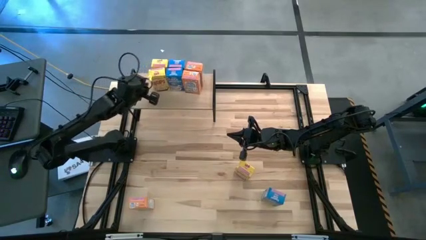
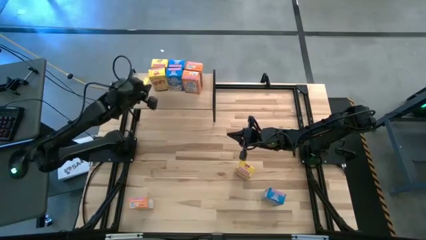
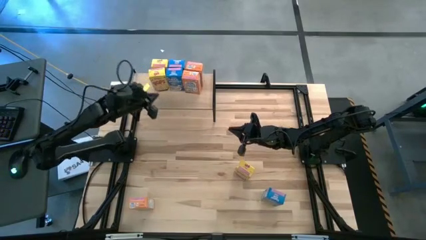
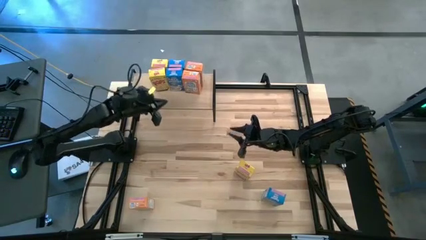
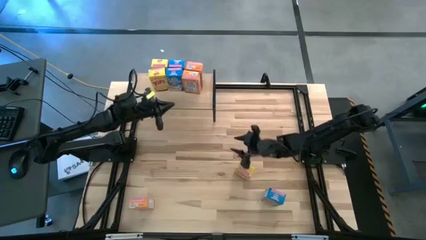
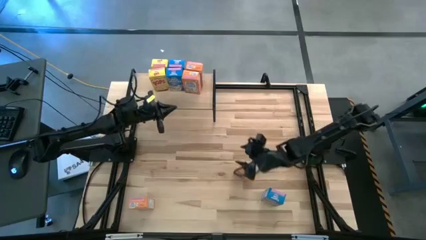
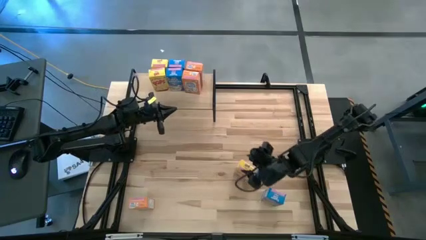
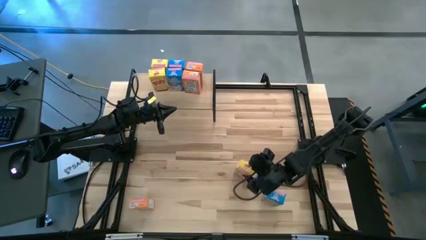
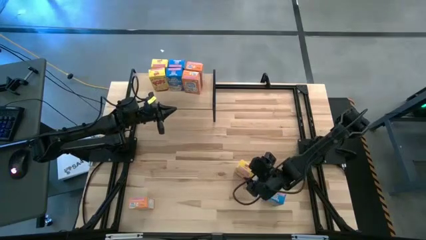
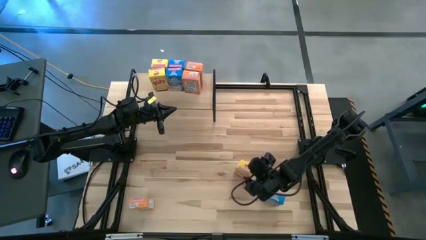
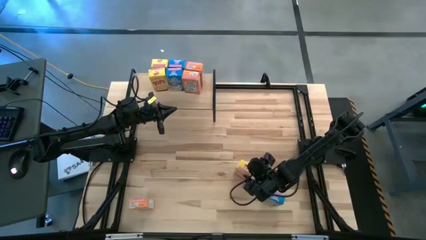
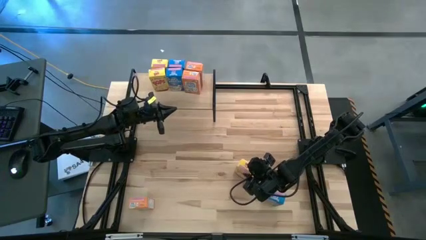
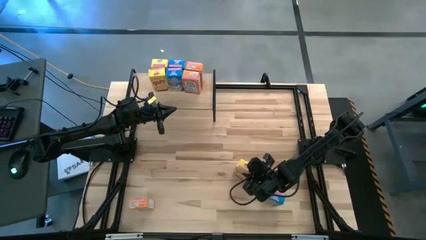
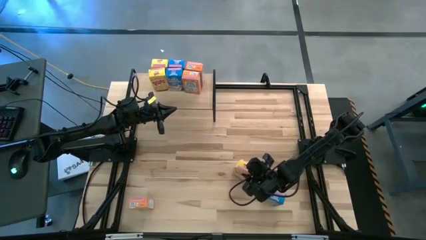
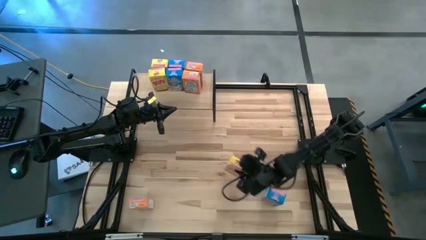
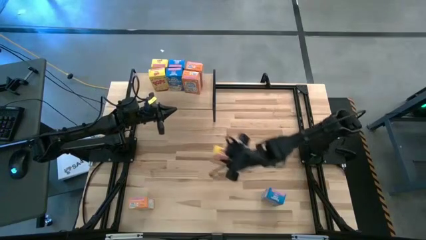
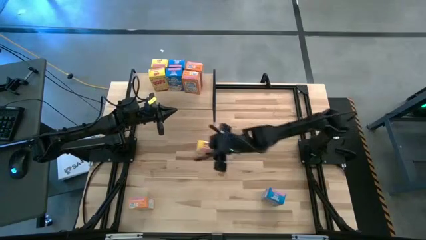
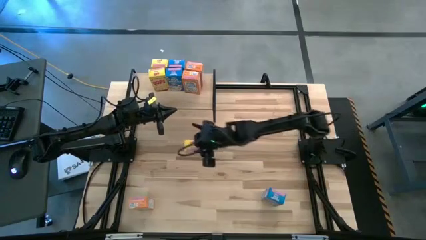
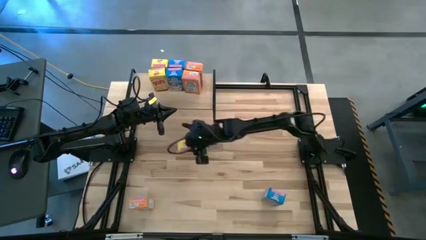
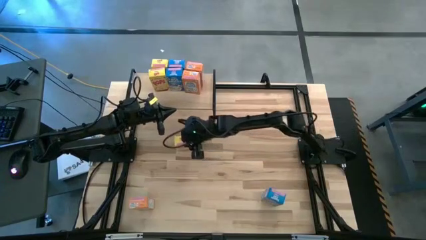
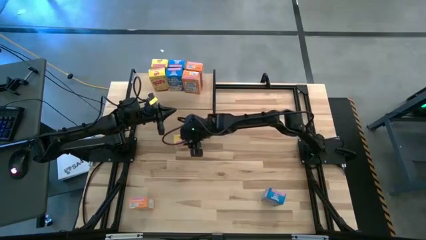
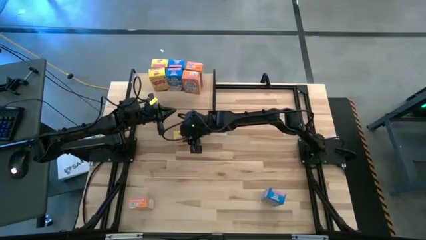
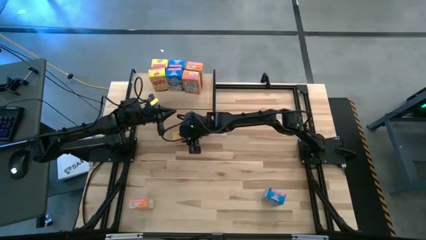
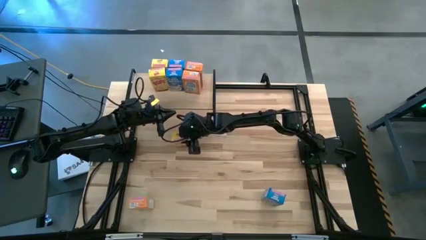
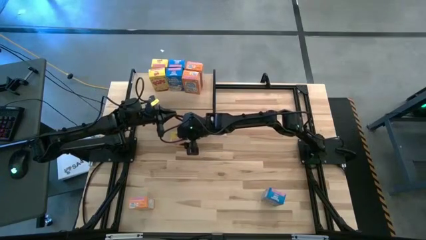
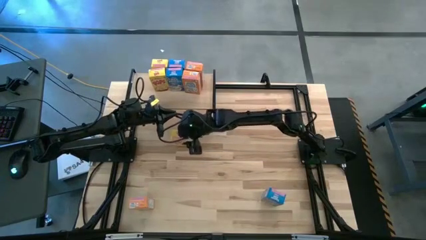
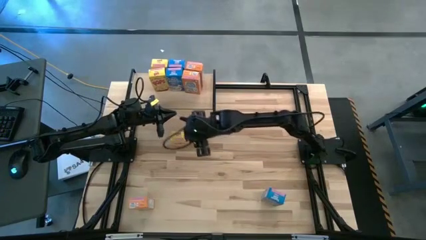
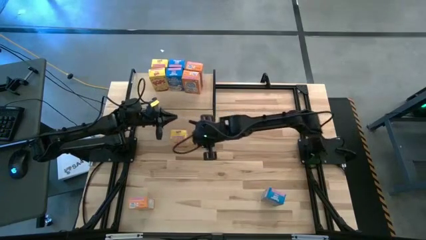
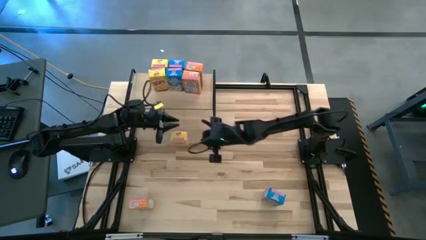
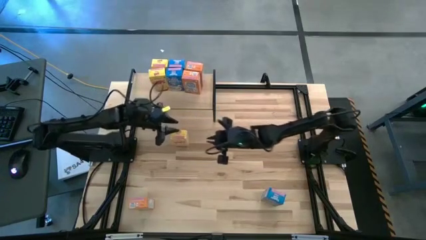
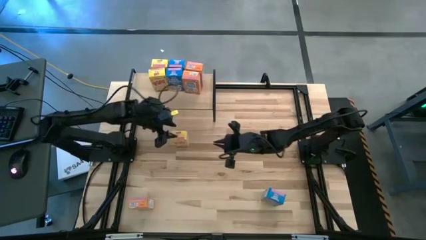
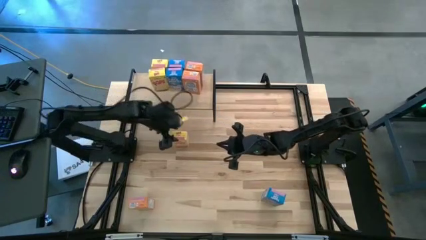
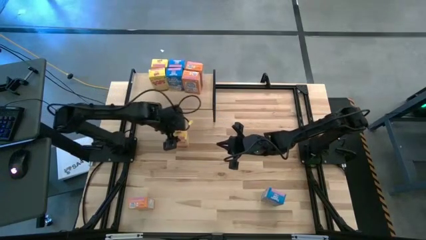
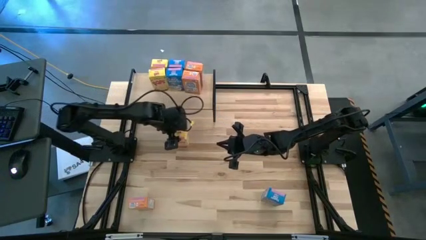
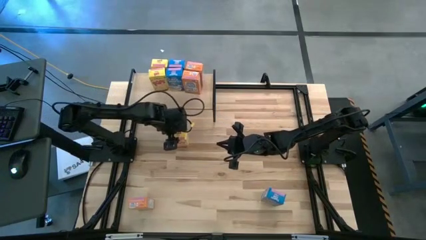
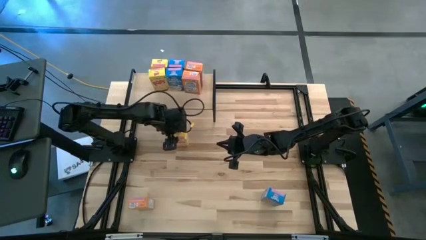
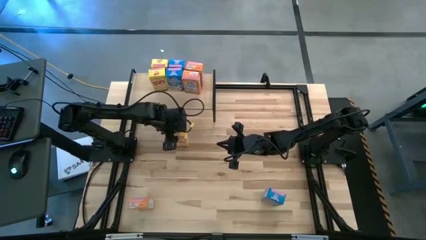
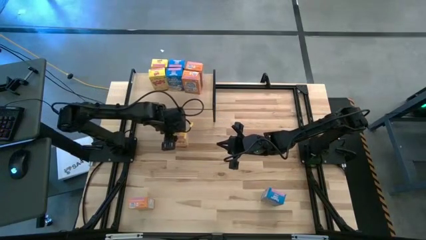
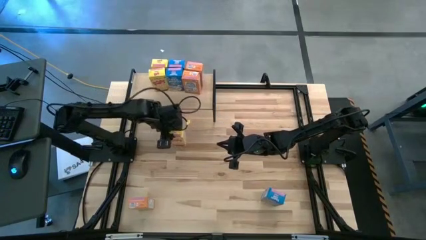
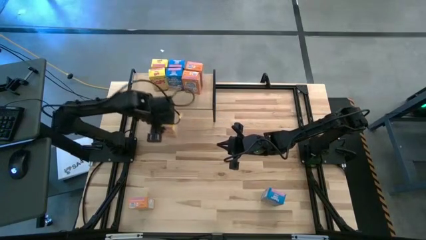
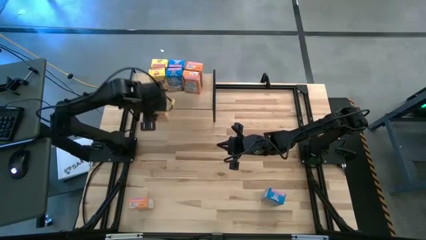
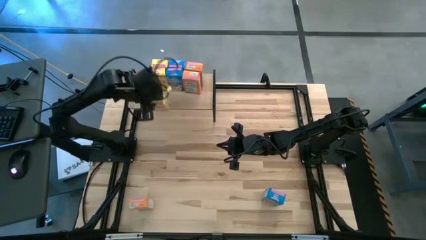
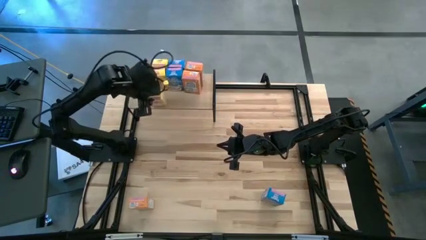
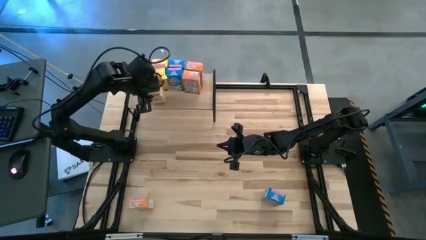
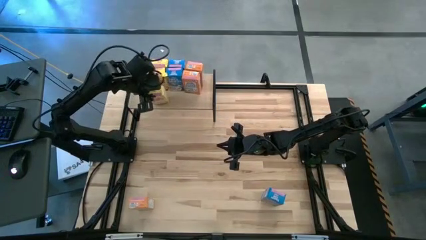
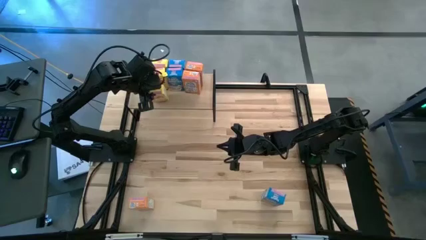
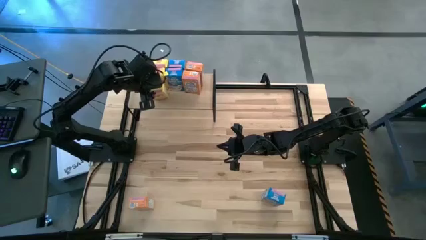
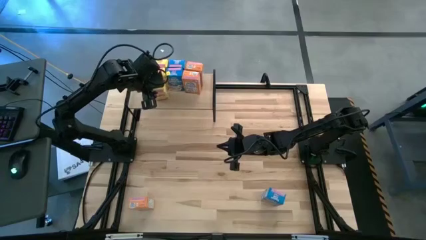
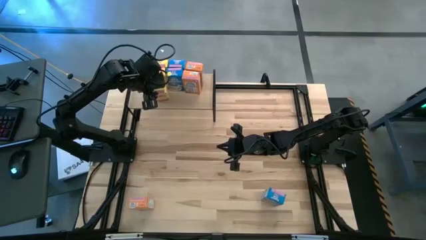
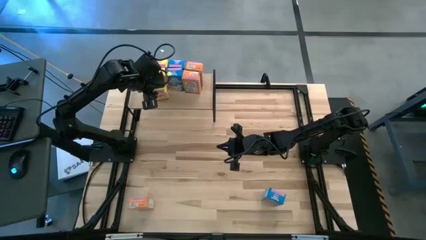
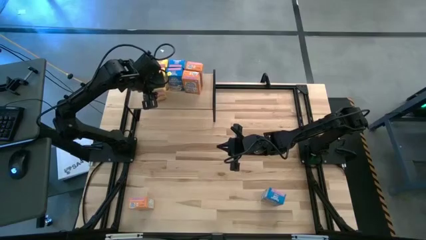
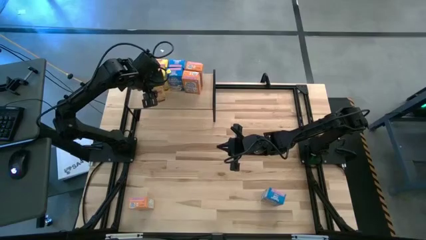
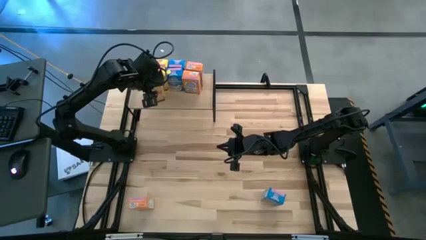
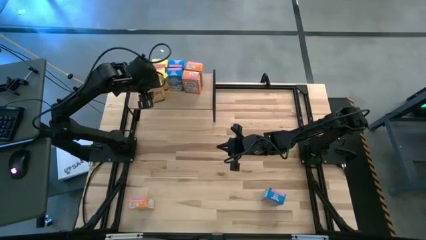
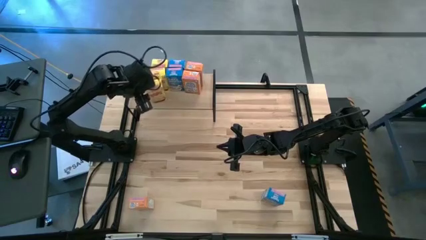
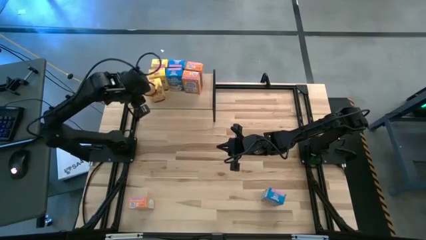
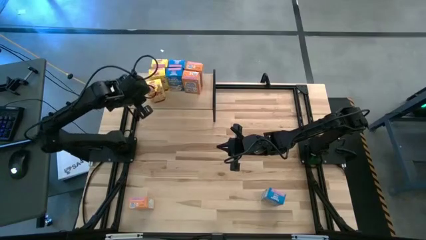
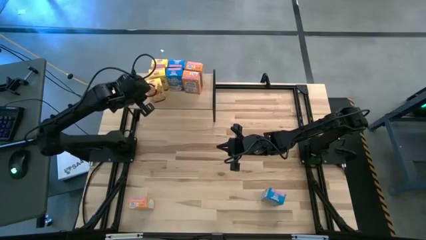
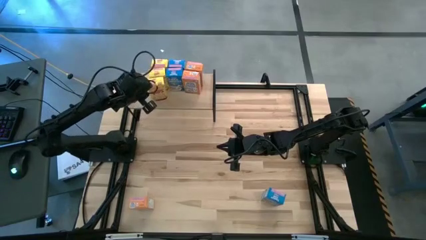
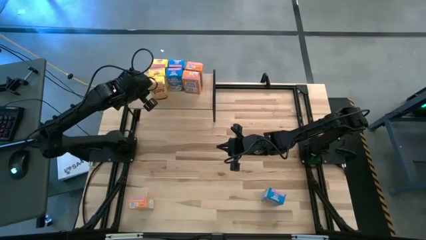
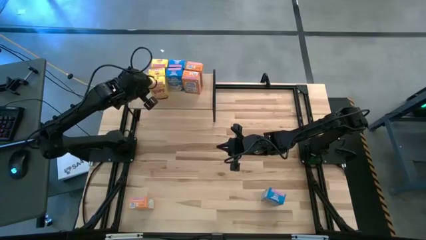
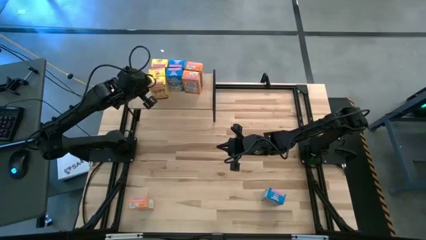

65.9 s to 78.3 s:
Task: Stack cereal on shelf
Put the yellow cereal box on the shelf aligned with other yellow cereal boxes

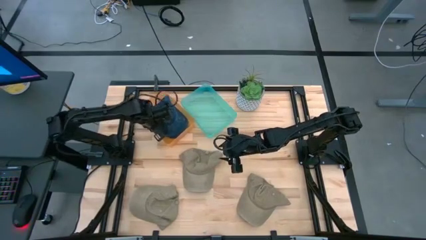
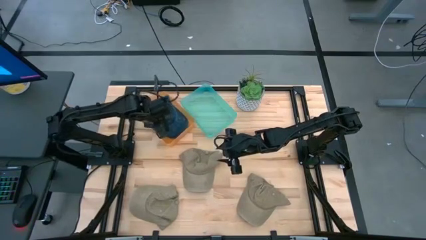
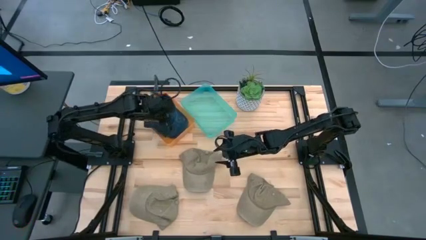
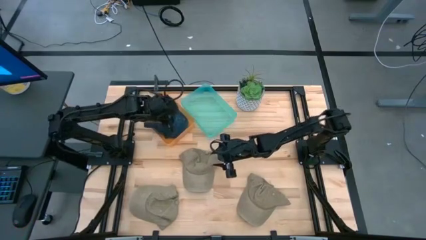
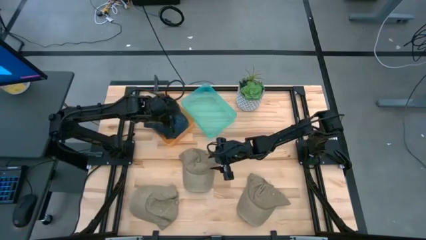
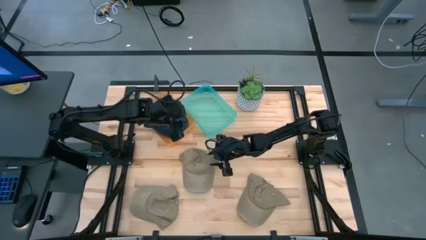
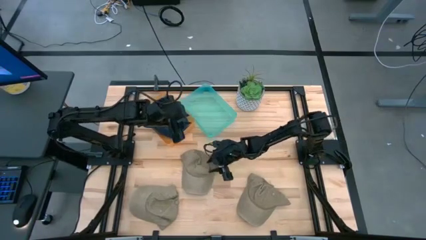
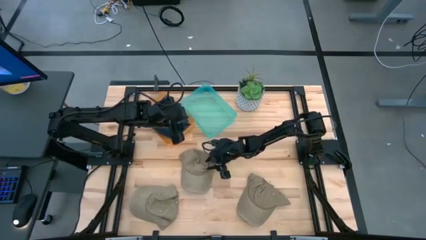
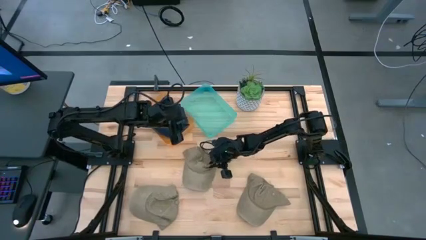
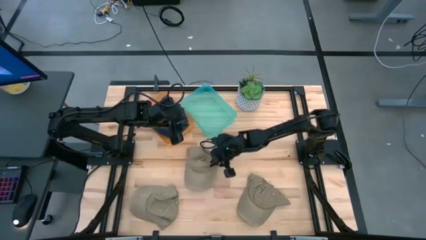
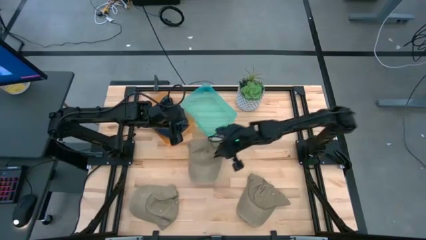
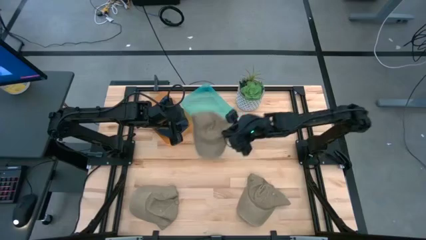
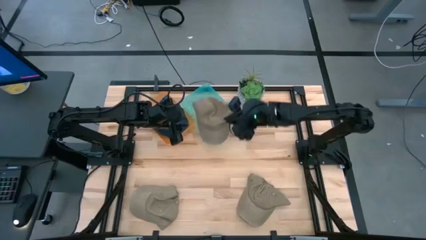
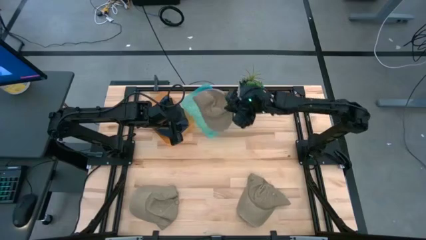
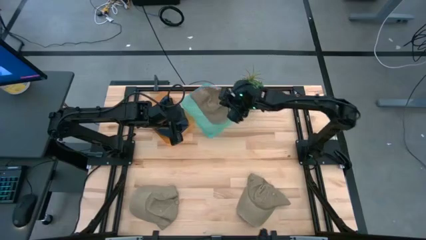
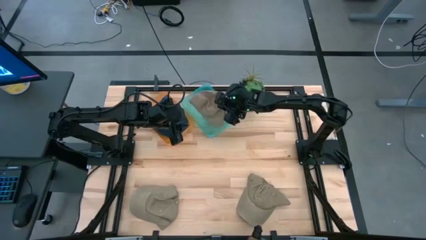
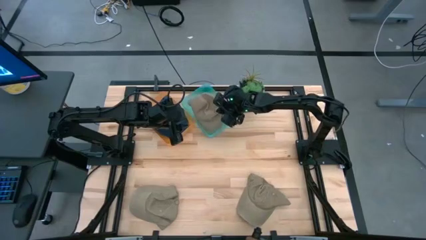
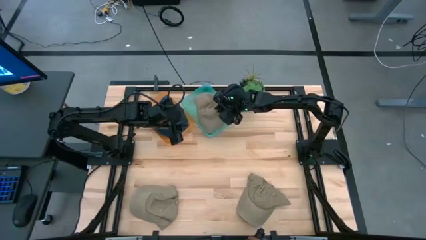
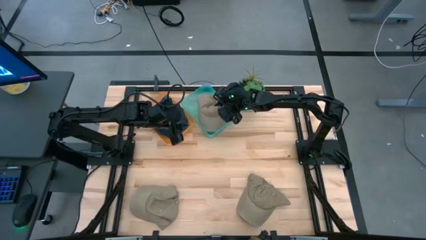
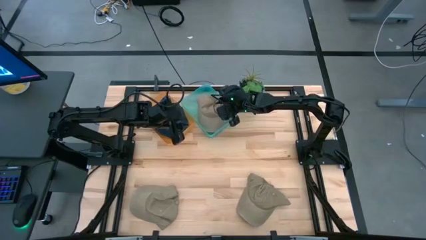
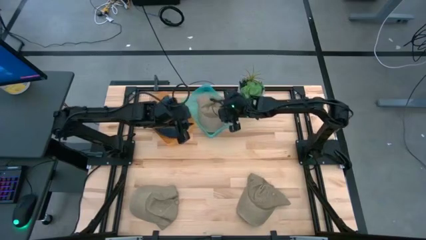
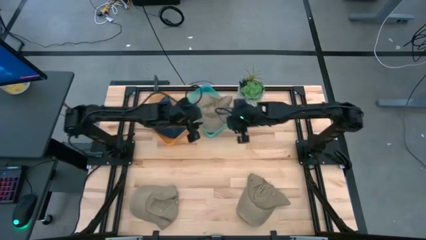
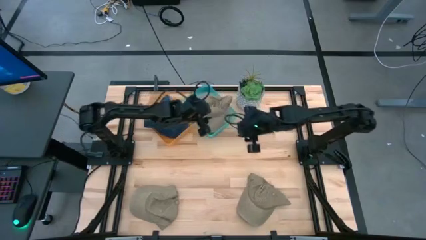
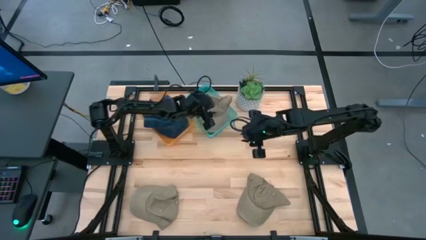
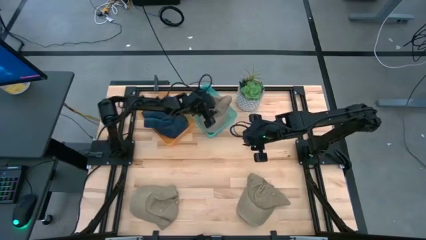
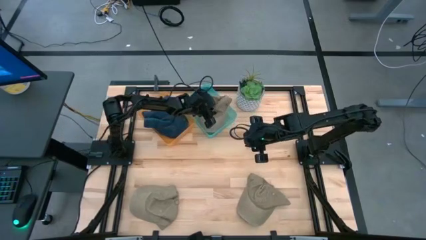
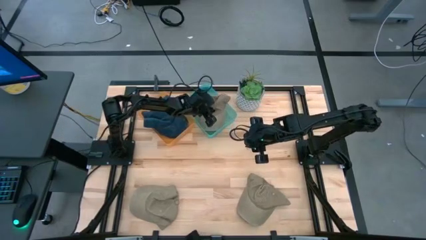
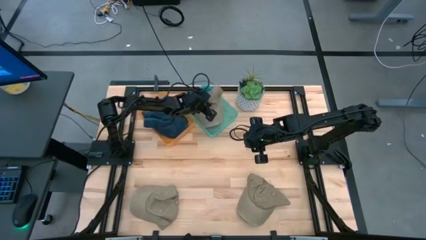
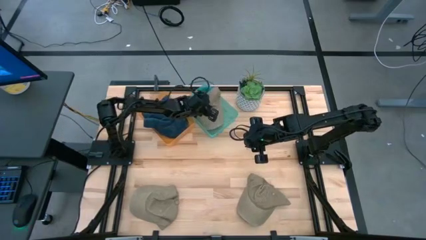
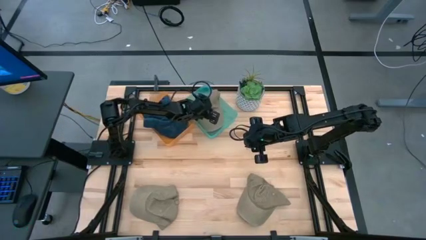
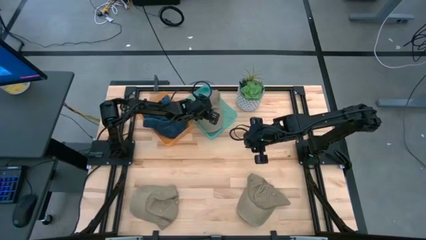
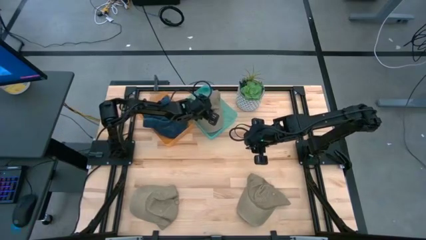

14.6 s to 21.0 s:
Task: Pick & Place hat
Put the top brown cap into the blue bin
